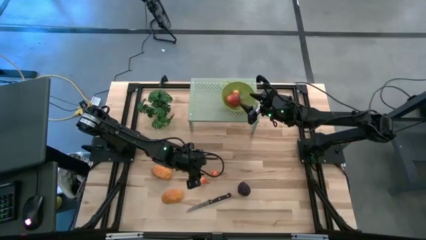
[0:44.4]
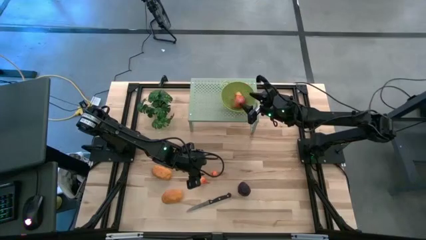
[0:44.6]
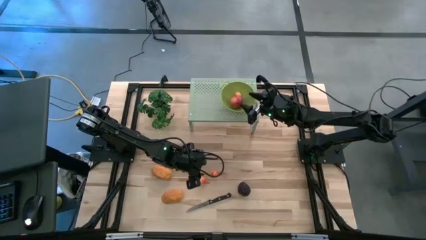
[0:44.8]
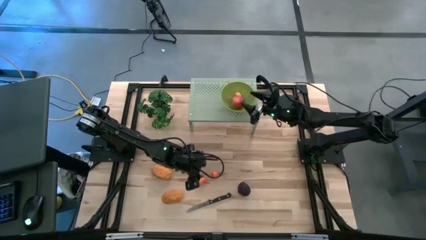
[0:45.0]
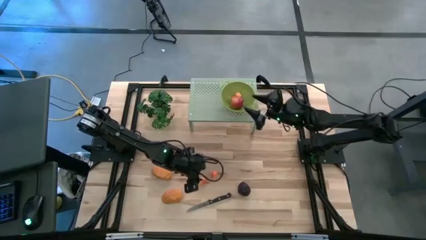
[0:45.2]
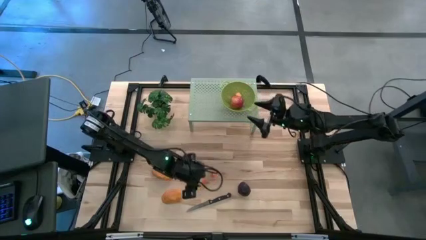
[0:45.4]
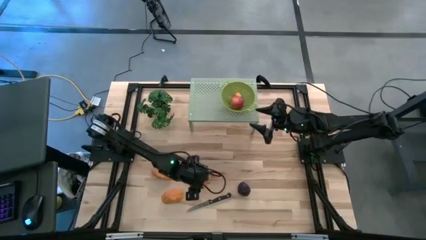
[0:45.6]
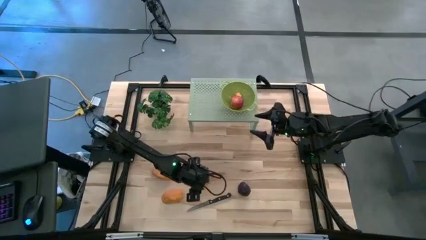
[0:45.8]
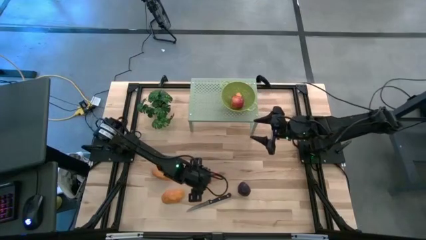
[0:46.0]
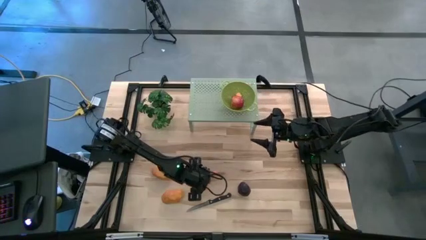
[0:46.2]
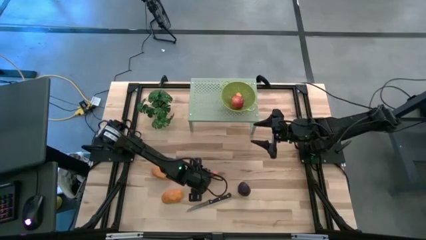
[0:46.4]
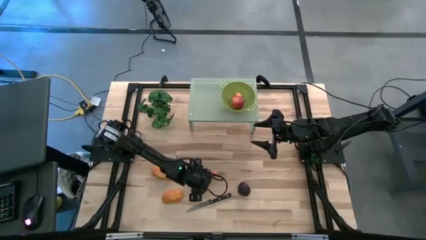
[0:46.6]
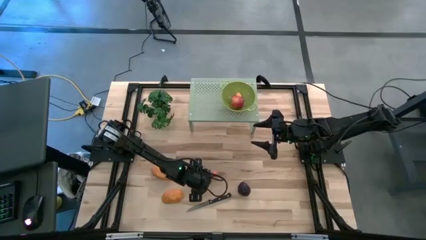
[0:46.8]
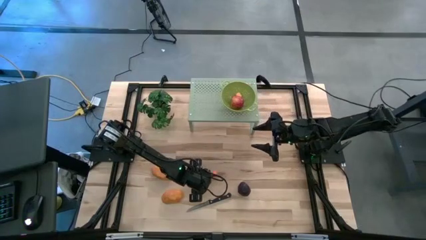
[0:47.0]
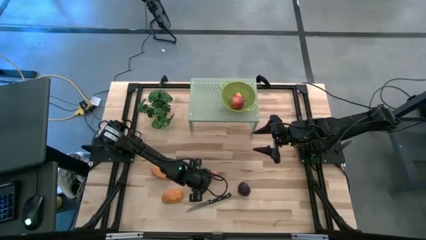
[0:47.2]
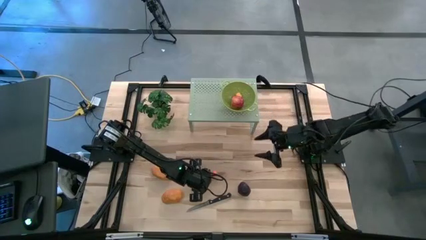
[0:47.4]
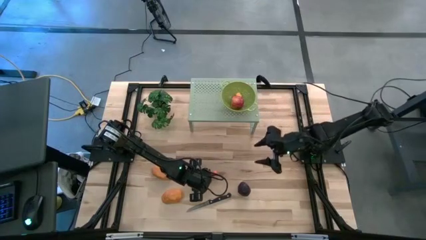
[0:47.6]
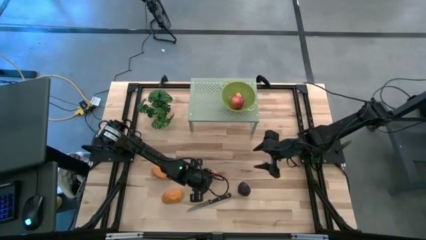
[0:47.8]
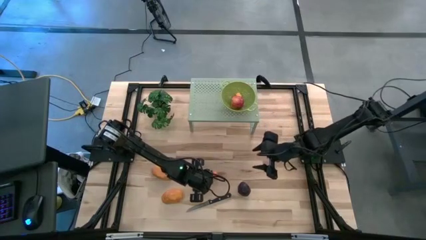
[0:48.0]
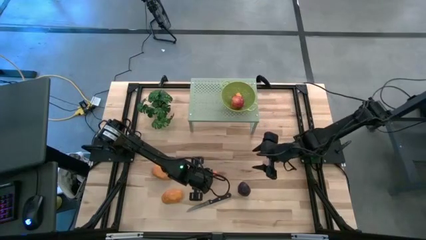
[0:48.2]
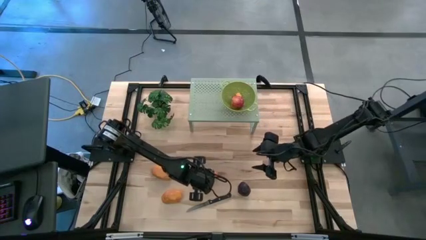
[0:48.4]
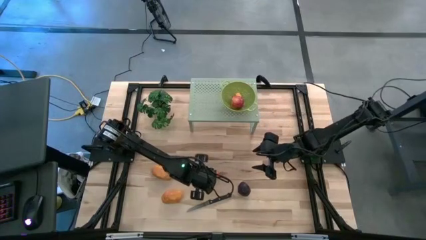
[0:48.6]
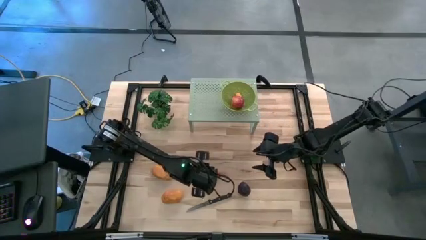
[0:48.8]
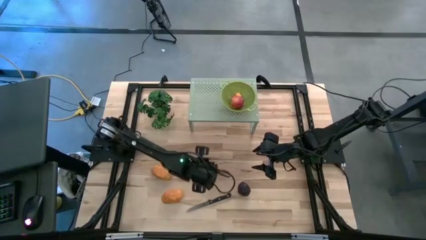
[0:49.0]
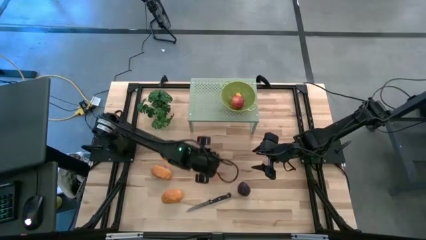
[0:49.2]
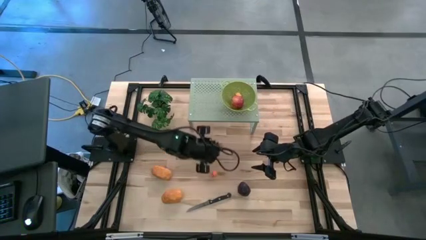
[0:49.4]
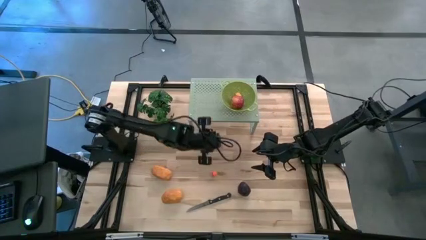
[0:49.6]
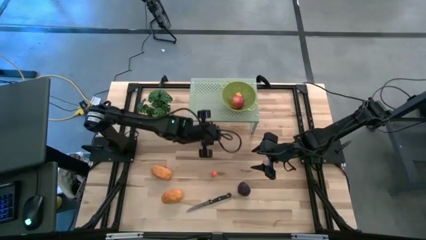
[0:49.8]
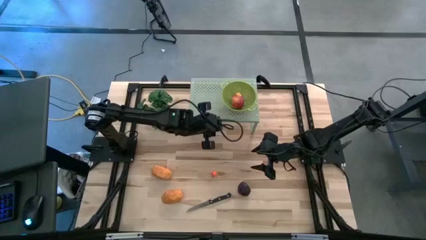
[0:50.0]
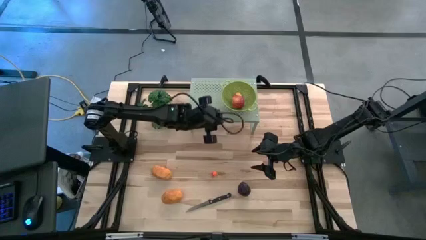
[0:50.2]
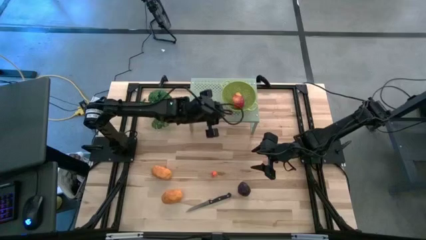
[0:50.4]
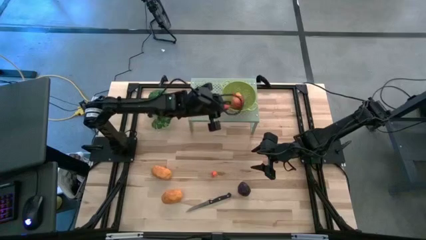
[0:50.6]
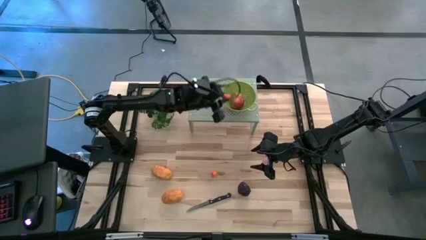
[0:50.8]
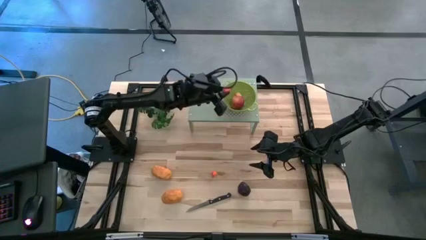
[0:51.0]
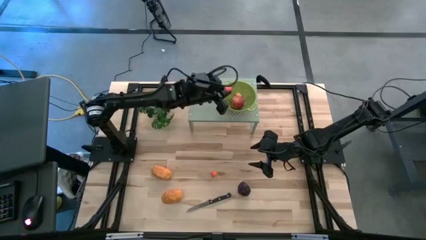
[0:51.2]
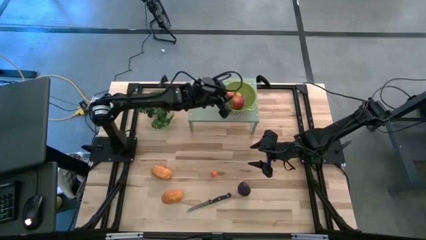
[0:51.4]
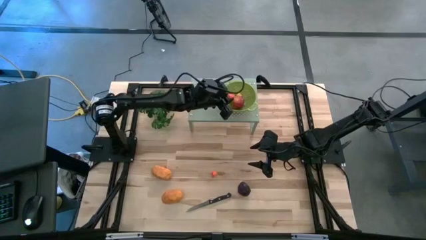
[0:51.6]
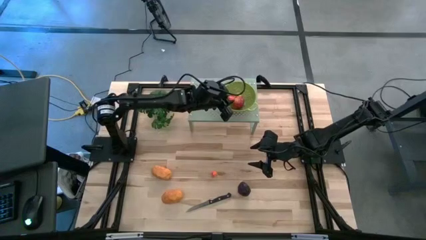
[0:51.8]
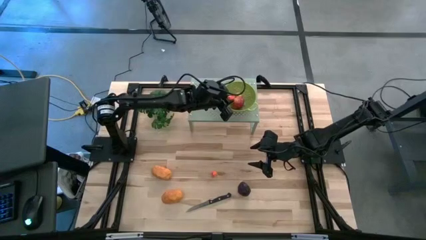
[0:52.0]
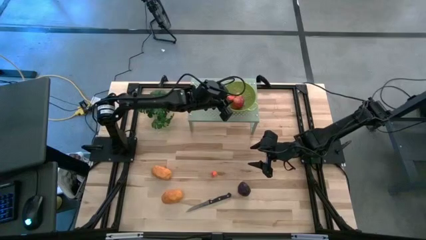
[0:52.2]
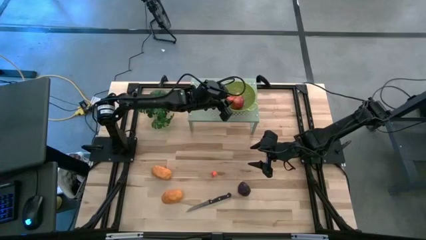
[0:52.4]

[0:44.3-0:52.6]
Task: Pick & Place Fruit
Put the left peach into the strainer bowl on the shelf

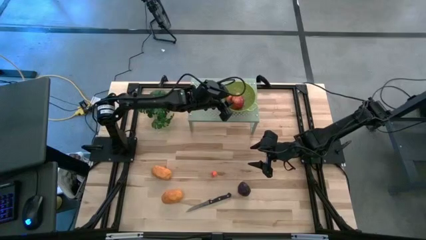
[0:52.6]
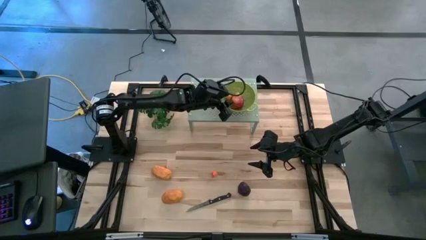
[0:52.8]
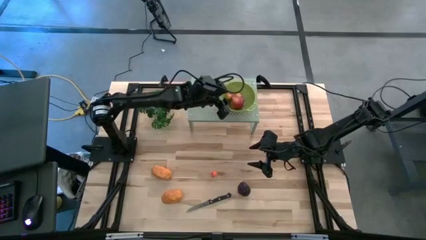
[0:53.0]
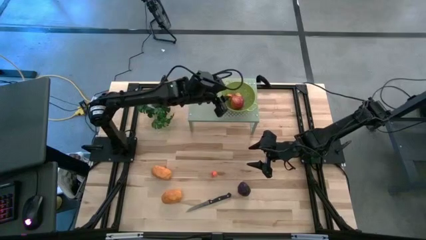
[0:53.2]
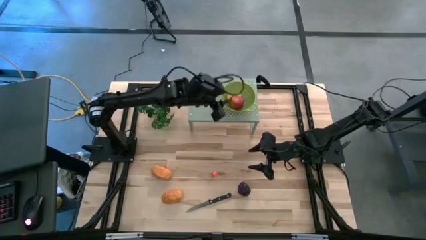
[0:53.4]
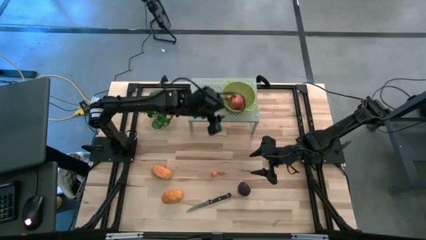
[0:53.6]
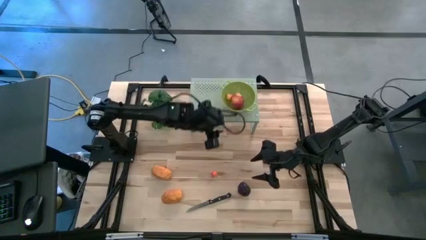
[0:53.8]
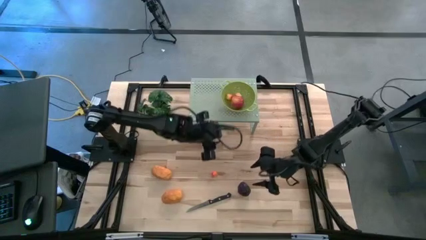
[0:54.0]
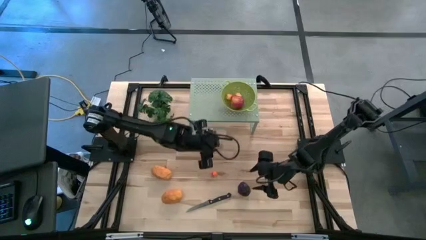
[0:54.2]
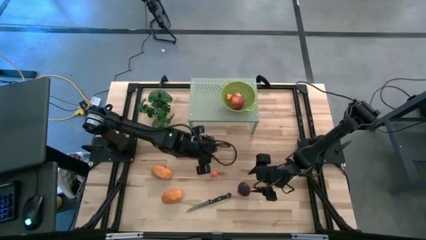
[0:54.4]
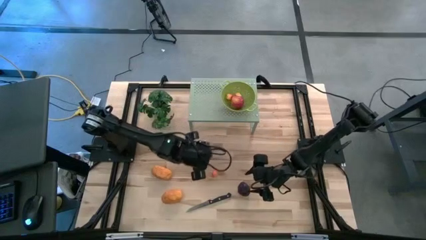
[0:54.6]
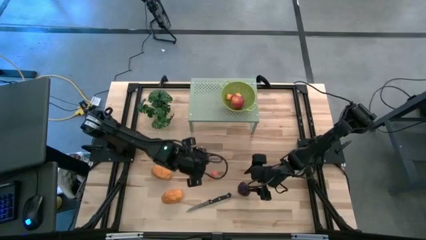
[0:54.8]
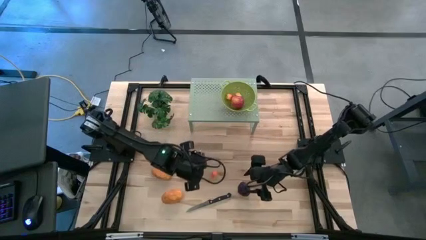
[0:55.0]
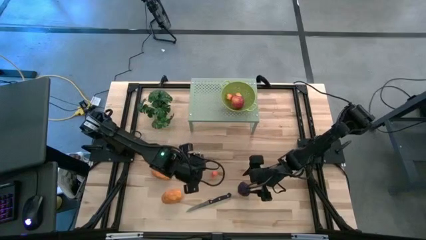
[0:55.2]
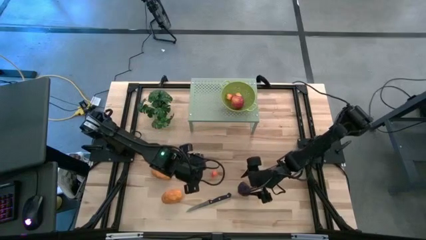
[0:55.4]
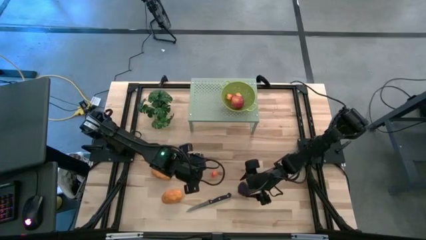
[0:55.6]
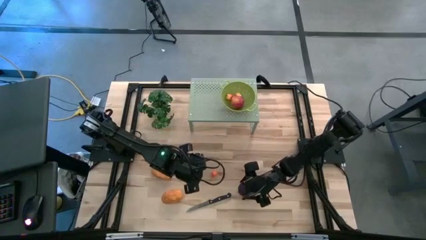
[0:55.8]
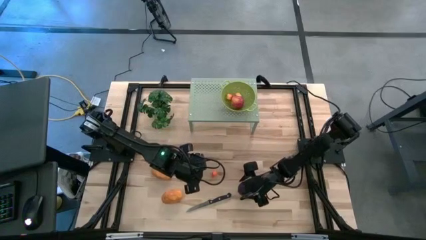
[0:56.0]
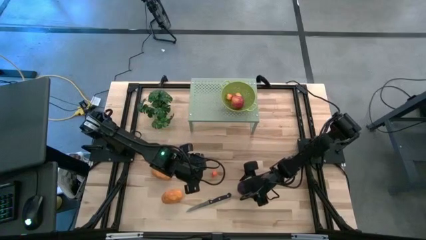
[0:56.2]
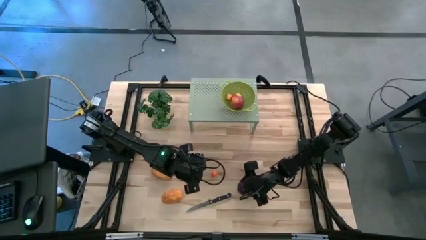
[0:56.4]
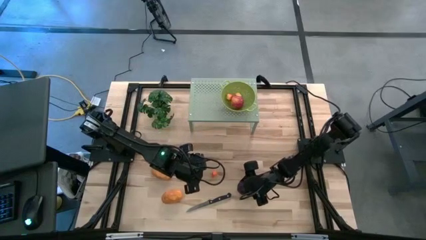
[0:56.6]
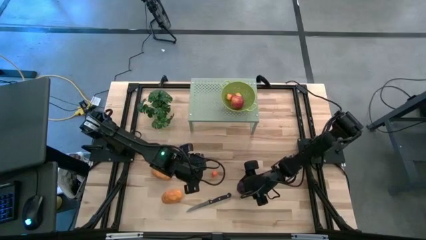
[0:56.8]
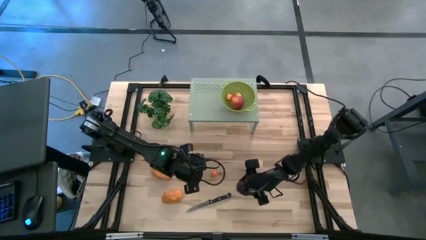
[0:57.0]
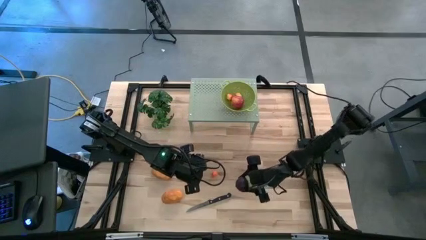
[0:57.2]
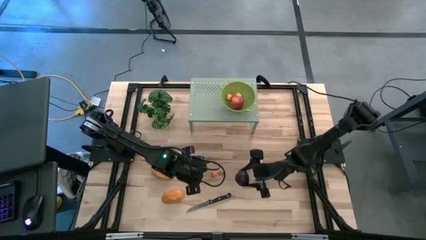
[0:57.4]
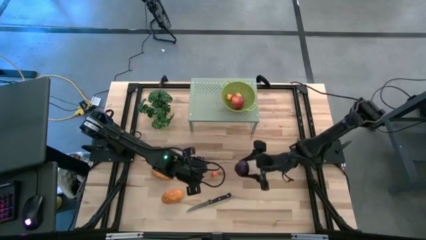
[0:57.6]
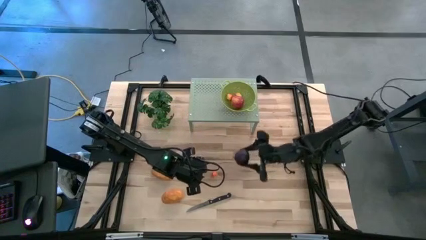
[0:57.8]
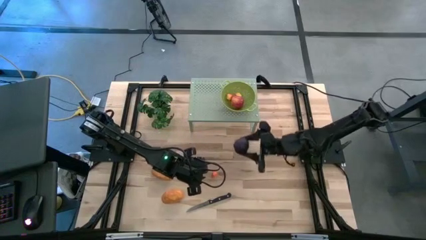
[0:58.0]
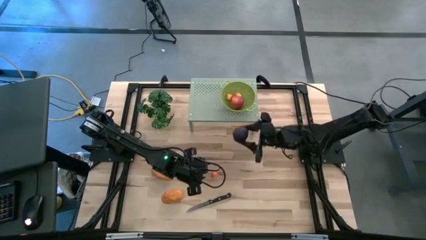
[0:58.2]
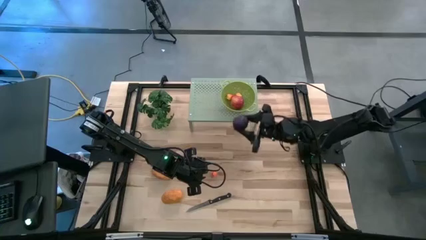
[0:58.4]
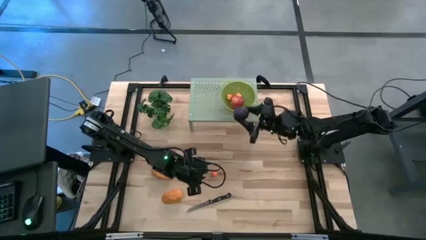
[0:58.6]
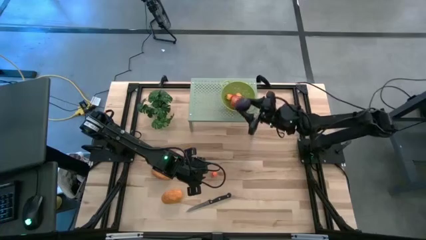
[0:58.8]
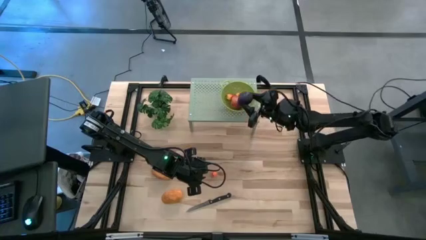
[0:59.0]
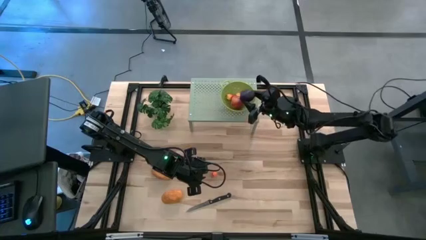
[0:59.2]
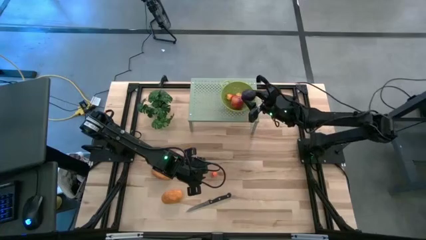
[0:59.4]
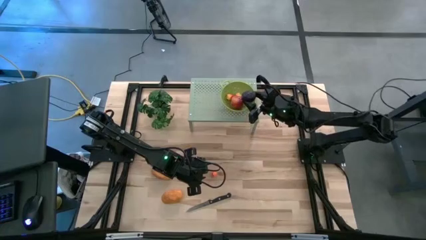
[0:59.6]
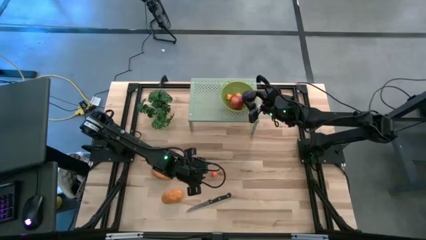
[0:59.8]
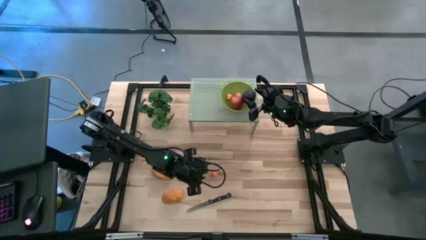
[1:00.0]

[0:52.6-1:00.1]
Put the avocado into the strainer bowl on the shelf
